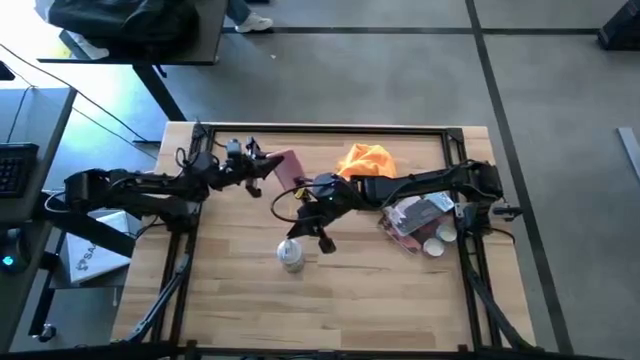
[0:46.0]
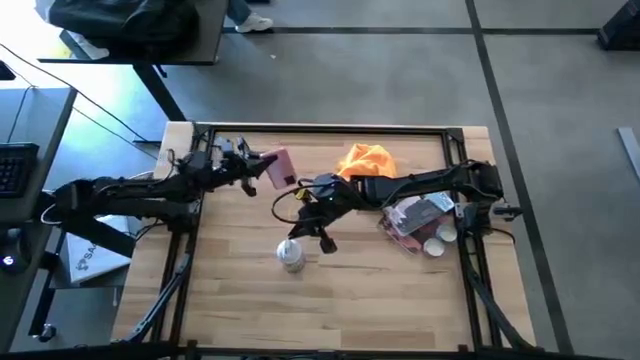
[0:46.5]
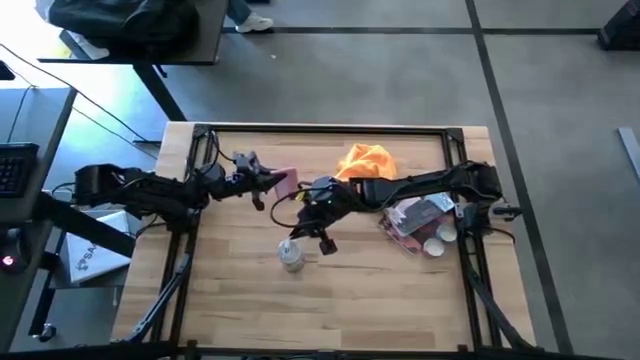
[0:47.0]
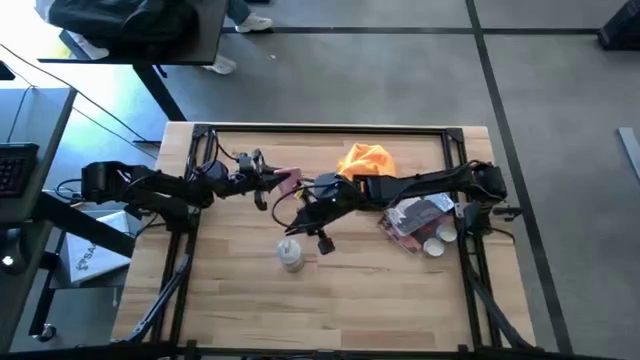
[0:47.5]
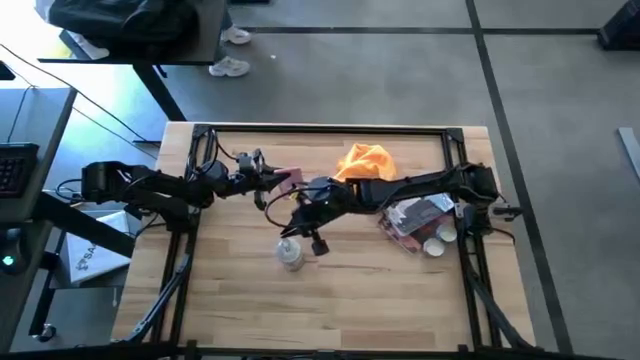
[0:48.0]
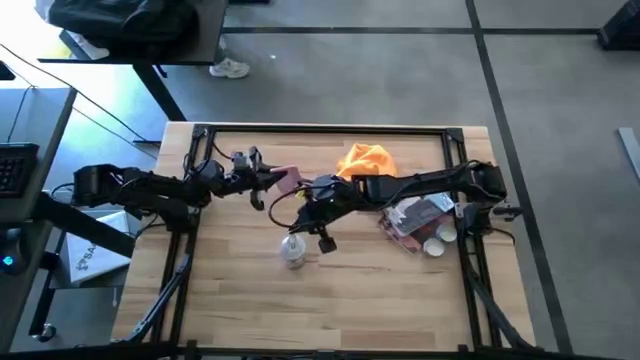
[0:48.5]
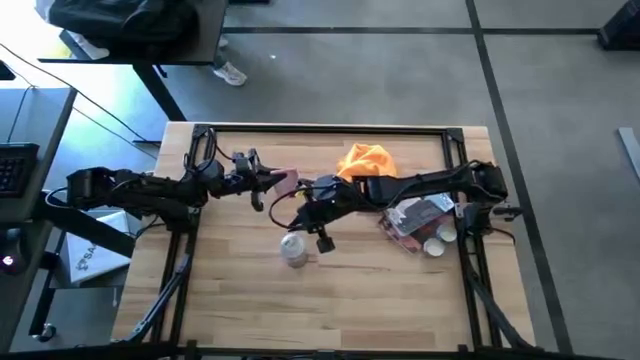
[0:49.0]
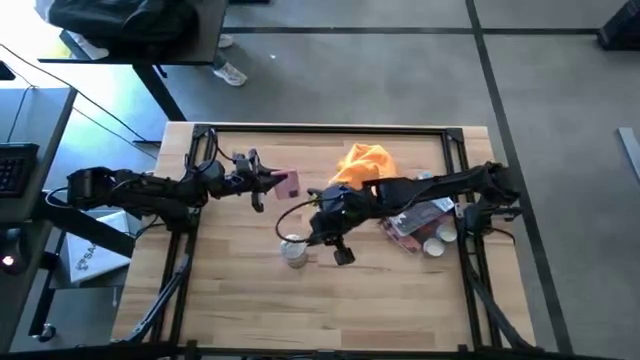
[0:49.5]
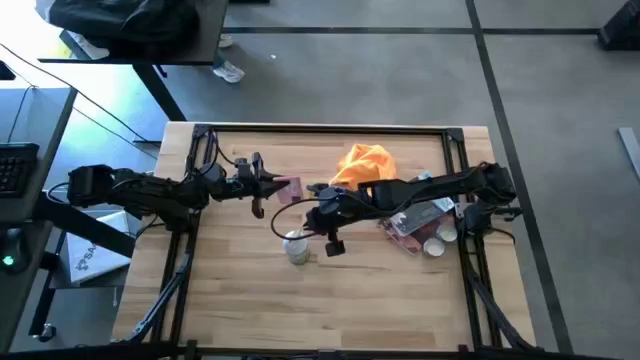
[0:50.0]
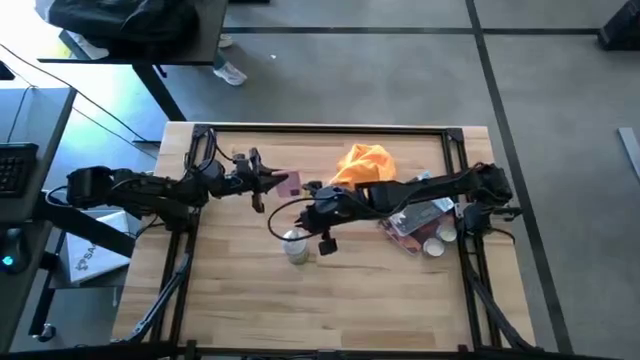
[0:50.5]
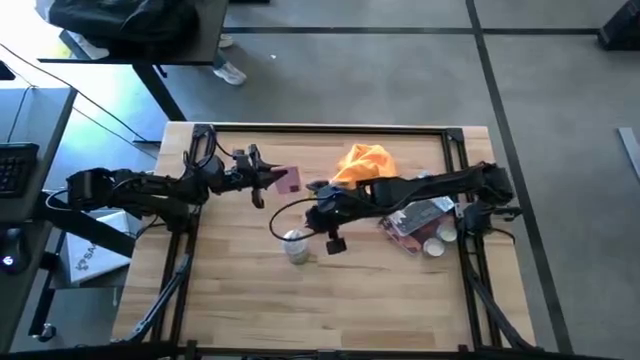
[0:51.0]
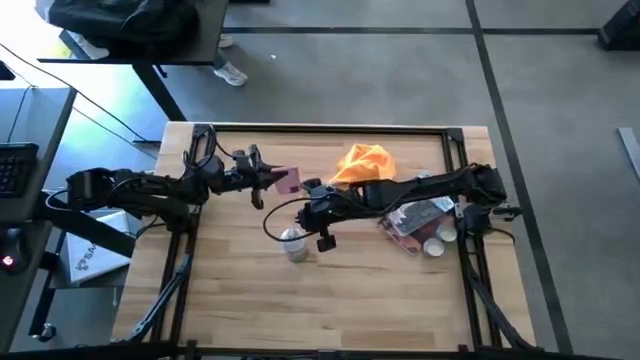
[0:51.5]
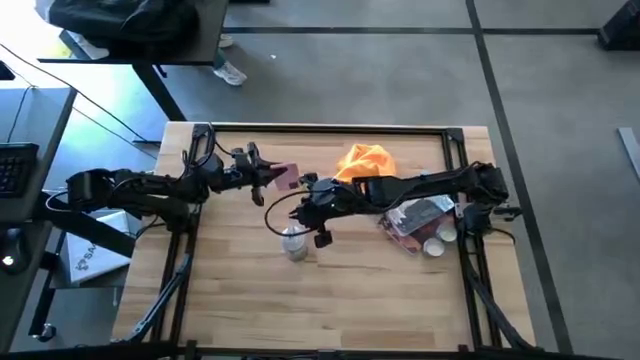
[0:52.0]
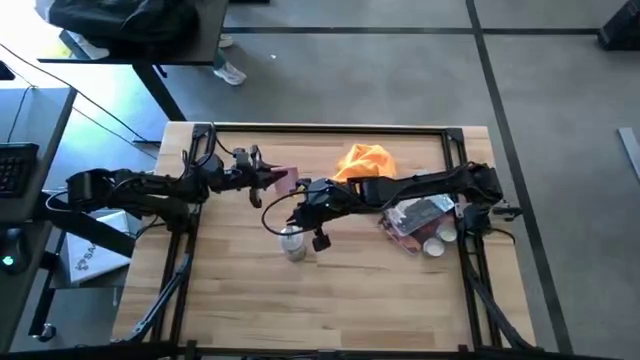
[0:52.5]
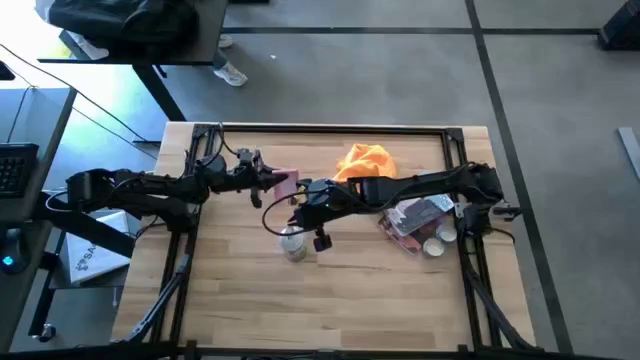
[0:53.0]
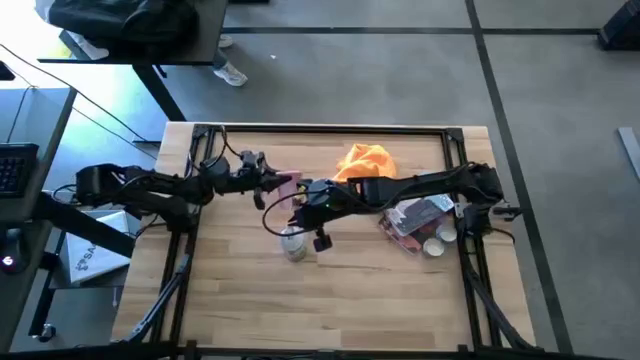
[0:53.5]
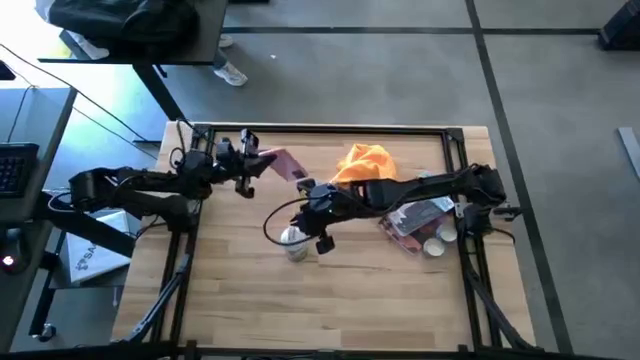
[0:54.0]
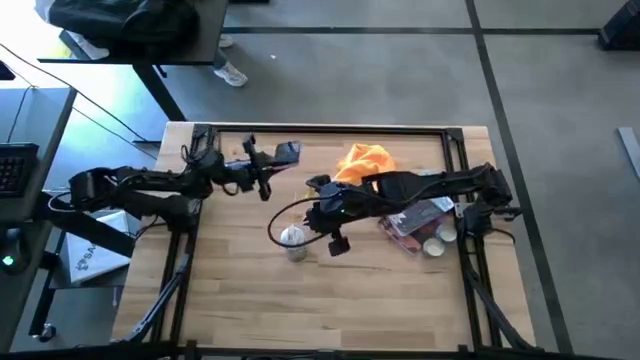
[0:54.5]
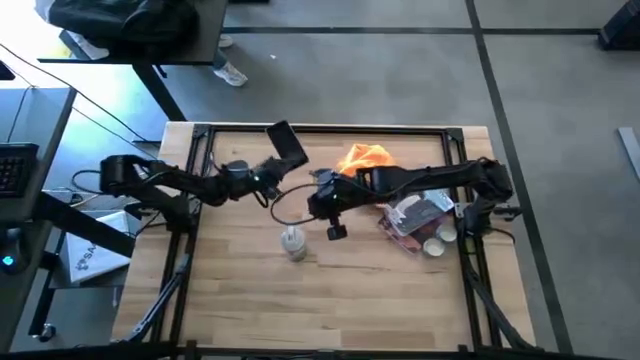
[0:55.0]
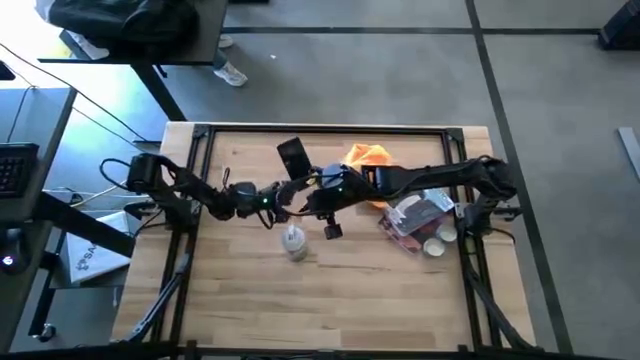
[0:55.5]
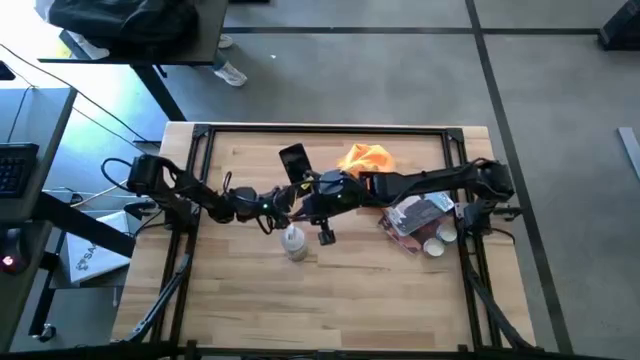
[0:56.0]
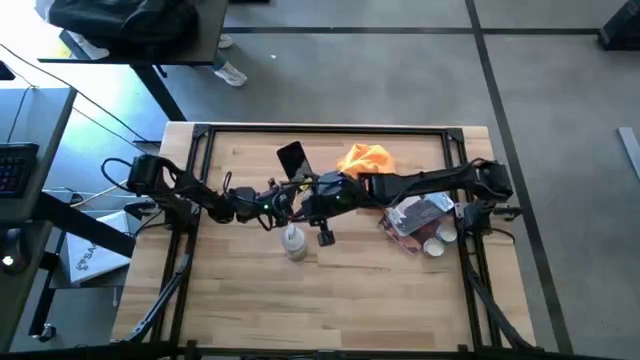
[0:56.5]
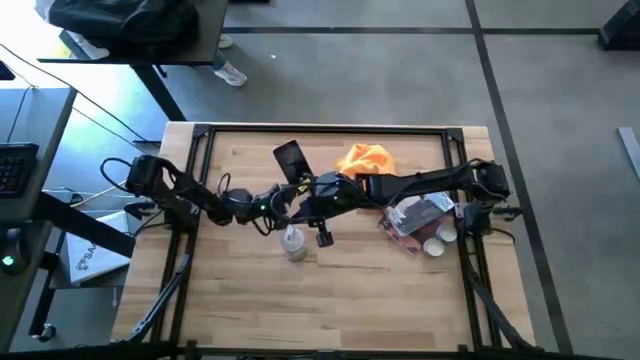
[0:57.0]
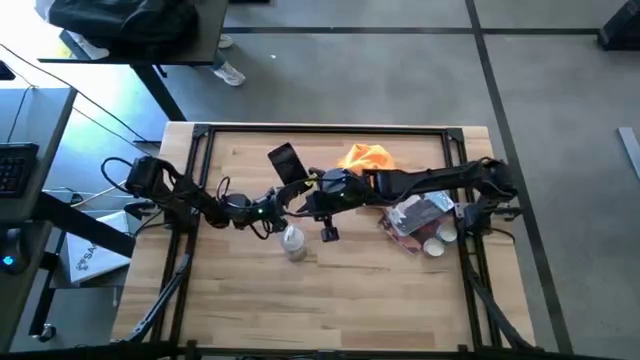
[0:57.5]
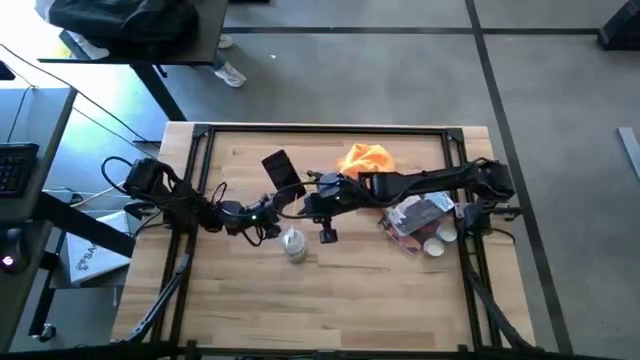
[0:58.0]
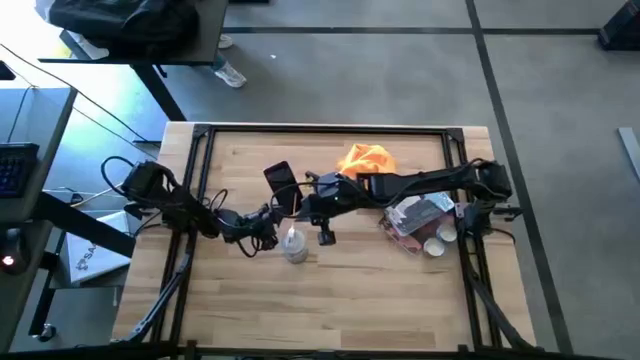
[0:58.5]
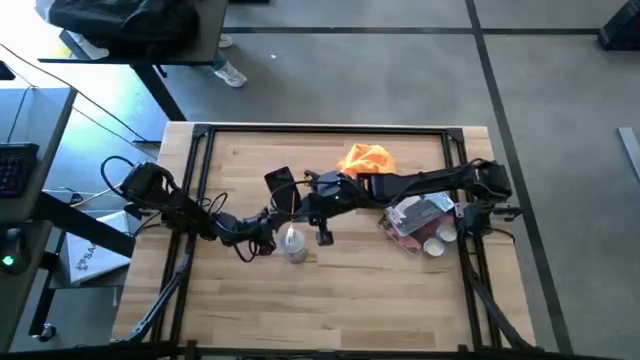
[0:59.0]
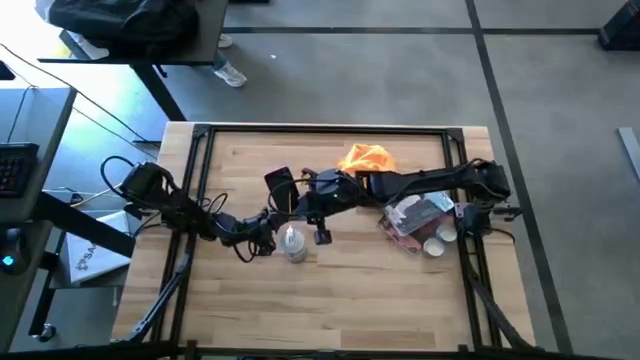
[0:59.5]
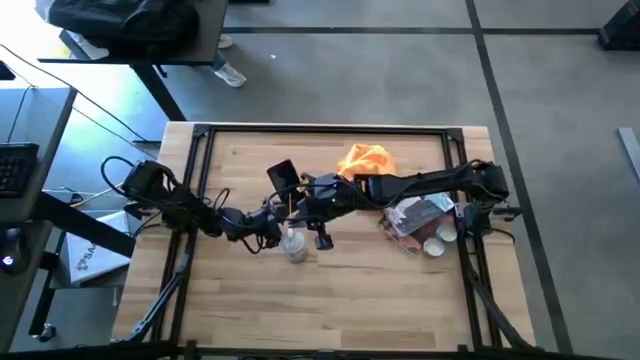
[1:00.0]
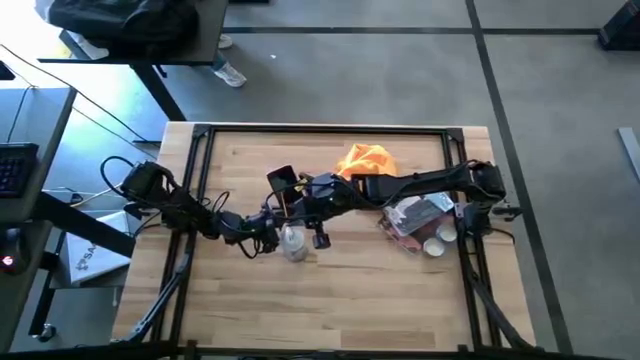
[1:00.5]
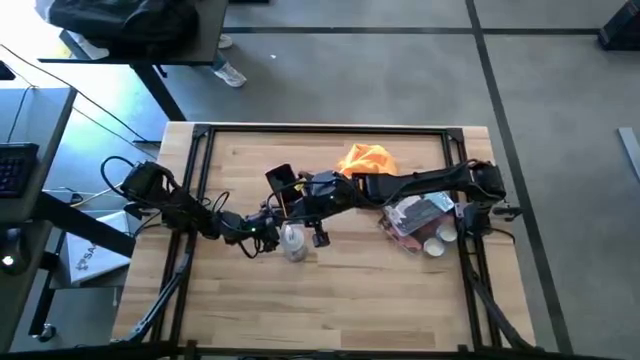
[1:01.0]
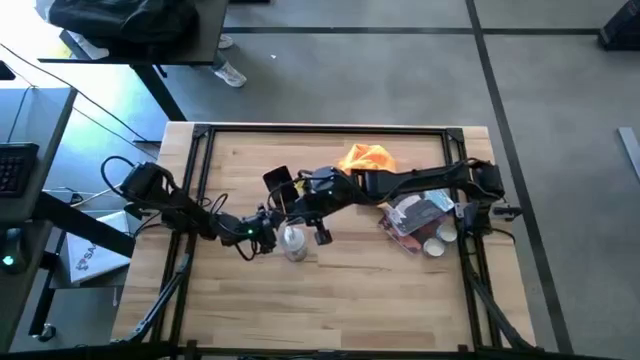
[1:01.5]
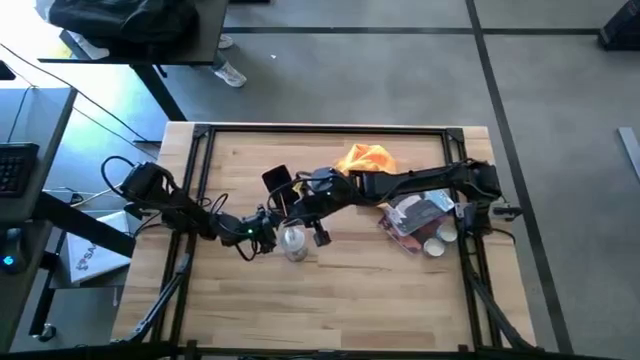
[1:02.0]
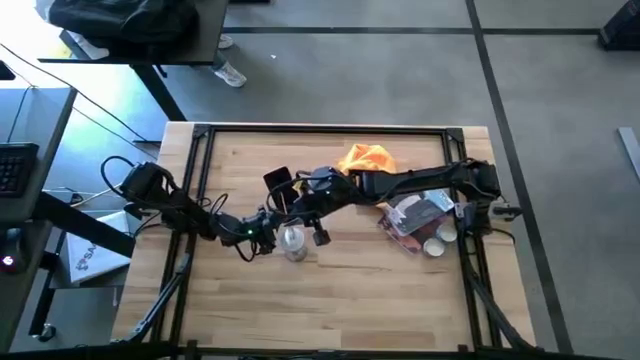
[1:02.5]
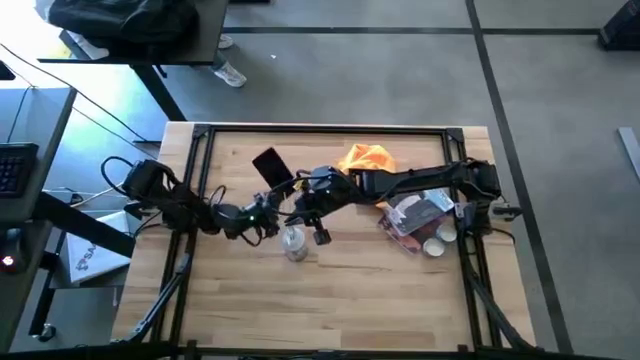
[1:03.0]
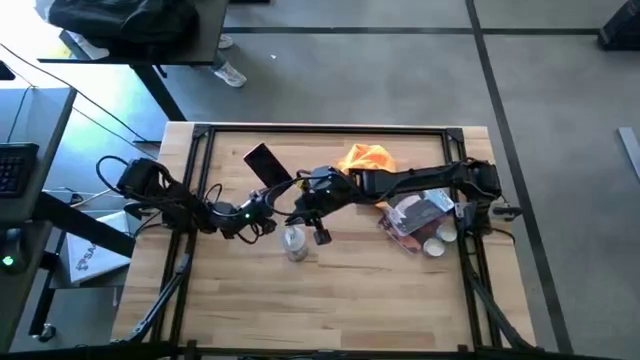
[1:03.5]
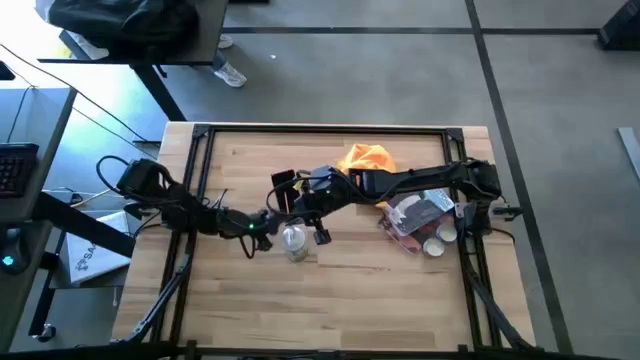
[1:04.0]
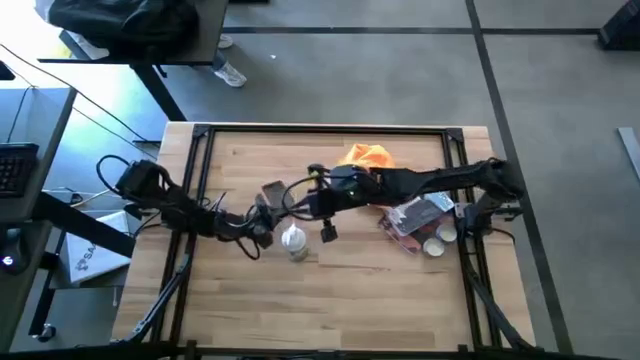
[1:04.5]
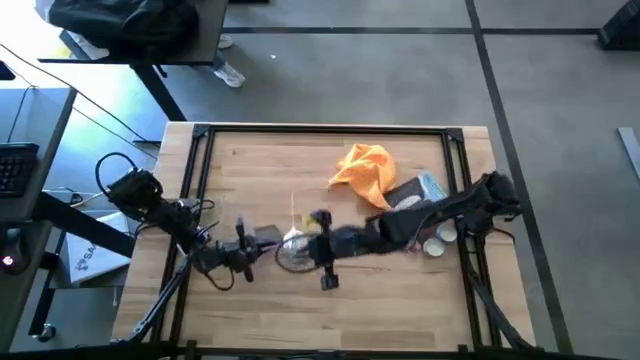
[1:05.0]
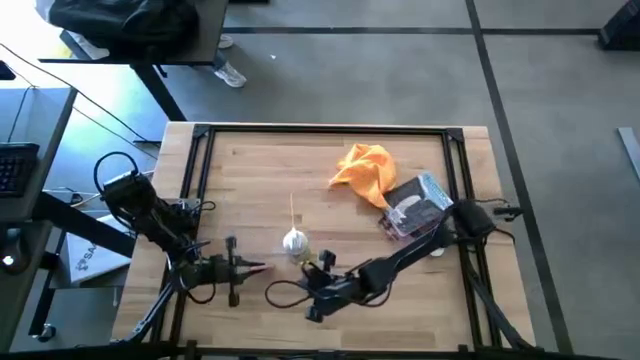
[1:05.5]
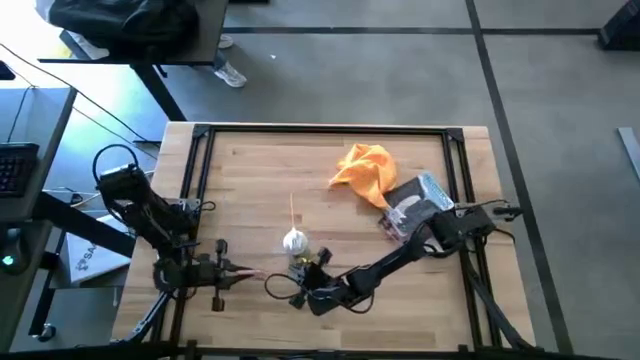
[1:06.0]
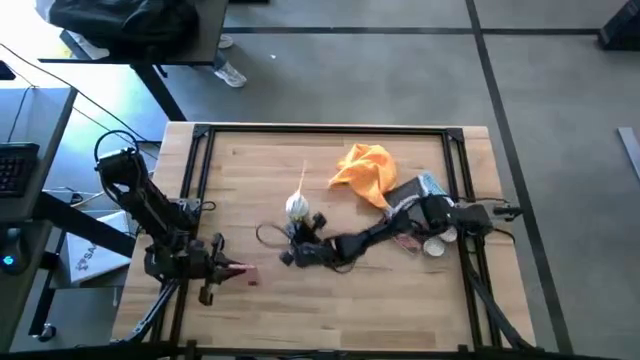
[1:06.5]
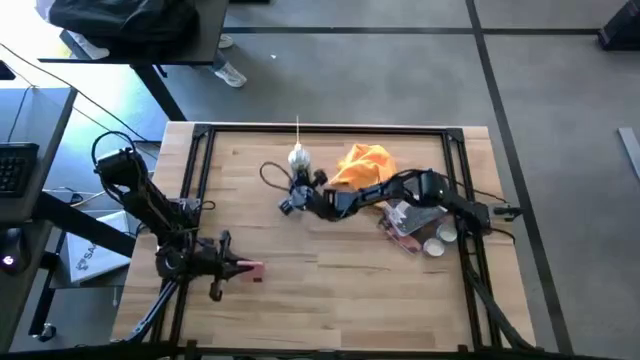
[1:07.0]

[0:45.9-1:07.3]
Task: Apply microfiber cloth
Spray the front and back of the cellphone using the spray bottle
